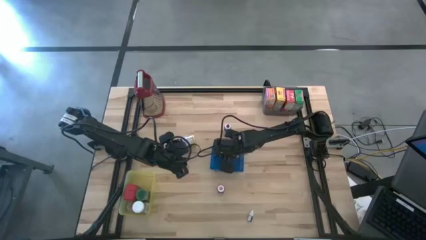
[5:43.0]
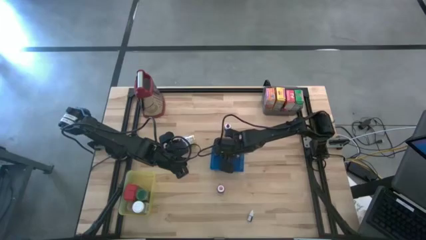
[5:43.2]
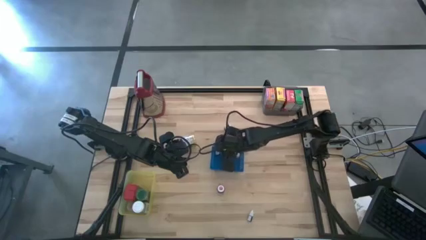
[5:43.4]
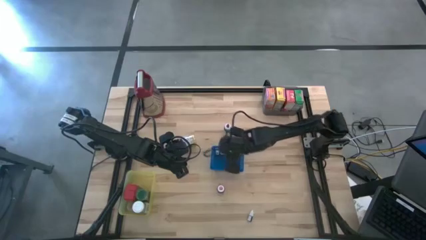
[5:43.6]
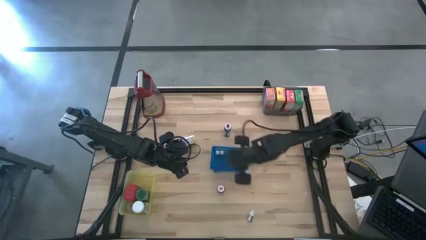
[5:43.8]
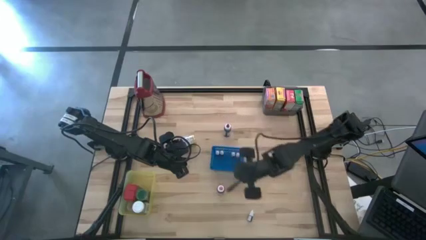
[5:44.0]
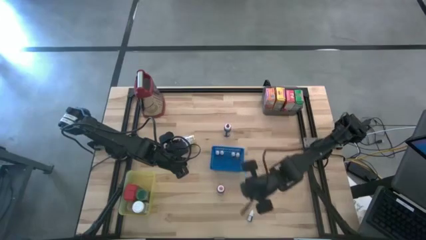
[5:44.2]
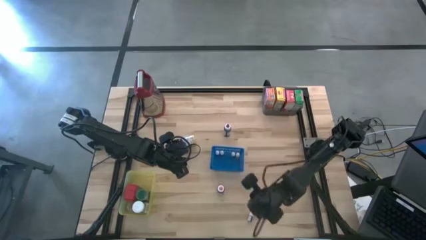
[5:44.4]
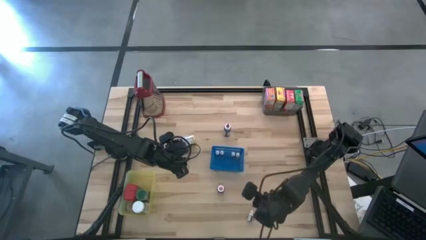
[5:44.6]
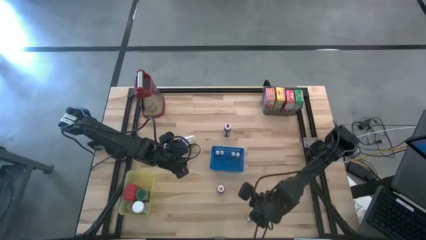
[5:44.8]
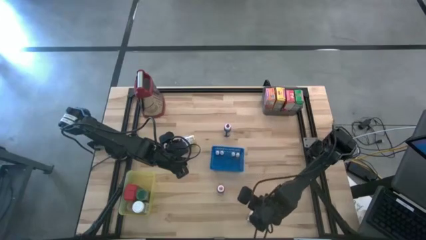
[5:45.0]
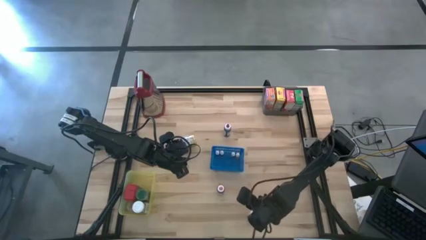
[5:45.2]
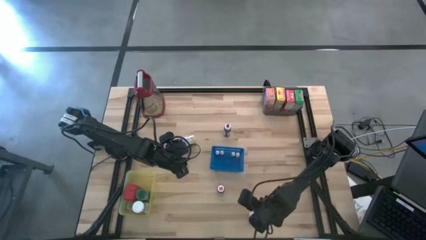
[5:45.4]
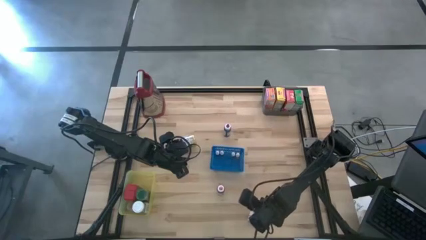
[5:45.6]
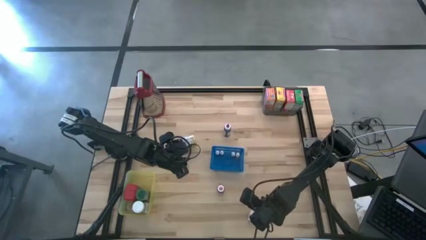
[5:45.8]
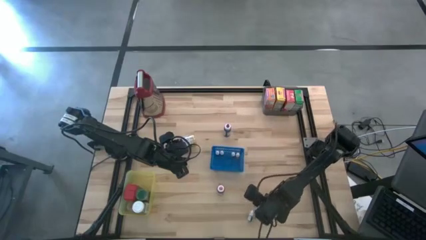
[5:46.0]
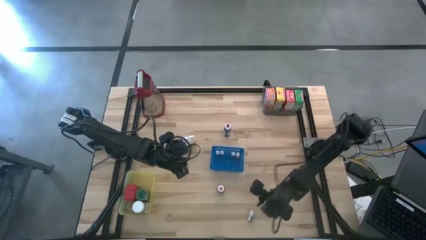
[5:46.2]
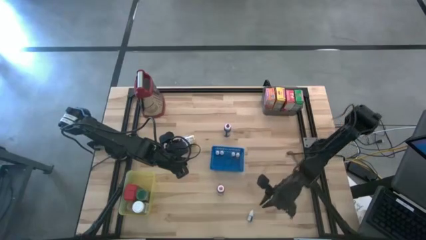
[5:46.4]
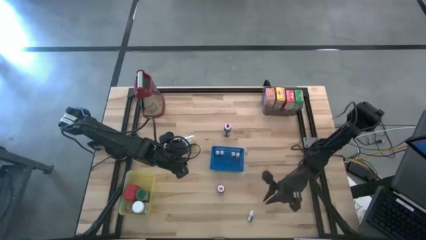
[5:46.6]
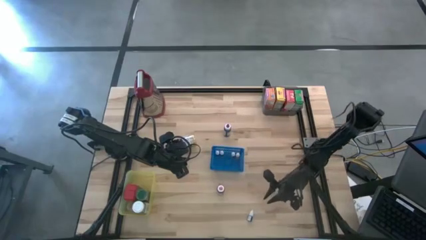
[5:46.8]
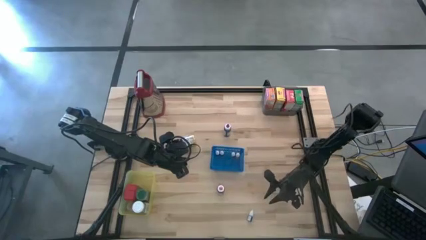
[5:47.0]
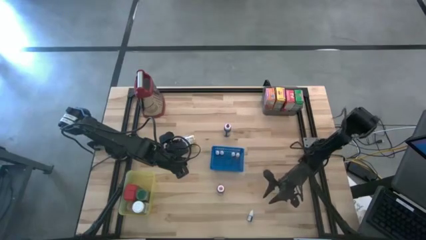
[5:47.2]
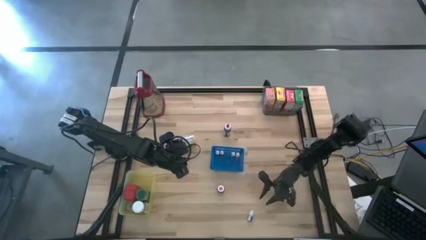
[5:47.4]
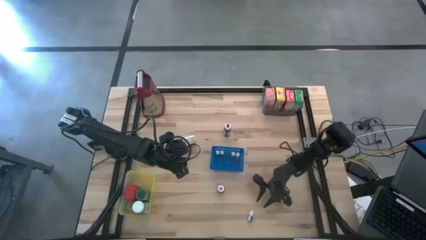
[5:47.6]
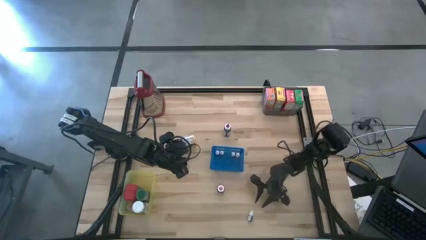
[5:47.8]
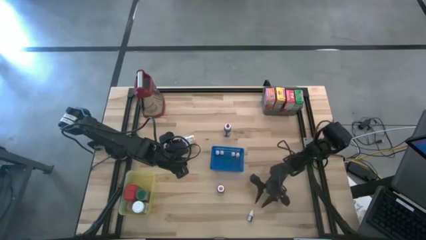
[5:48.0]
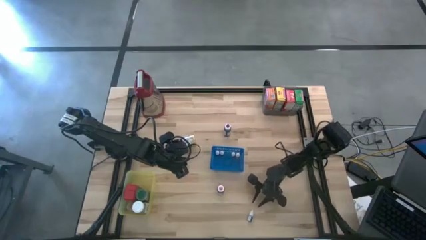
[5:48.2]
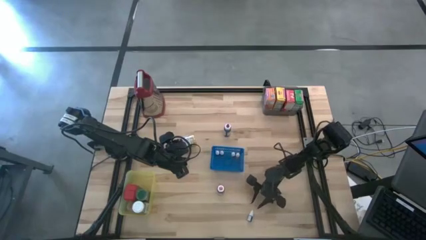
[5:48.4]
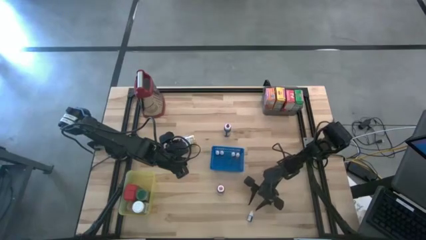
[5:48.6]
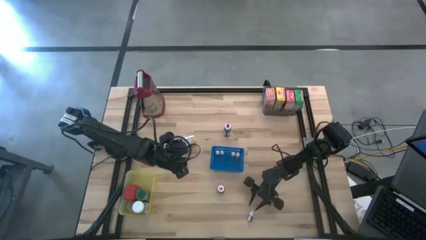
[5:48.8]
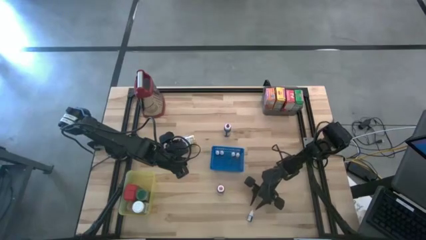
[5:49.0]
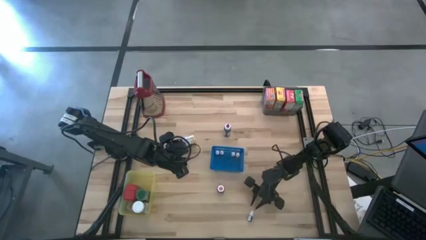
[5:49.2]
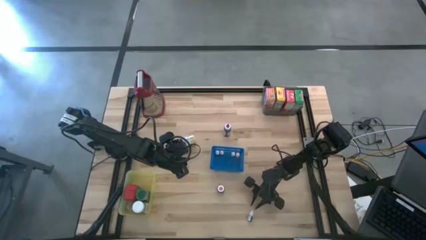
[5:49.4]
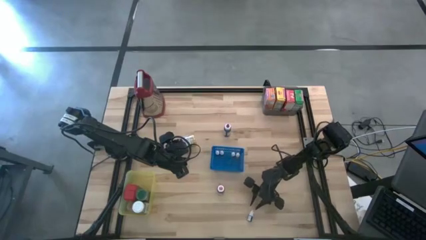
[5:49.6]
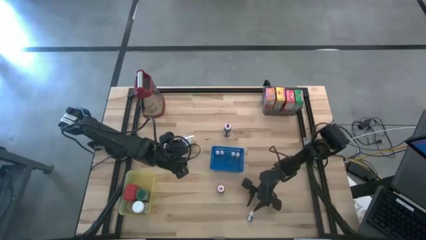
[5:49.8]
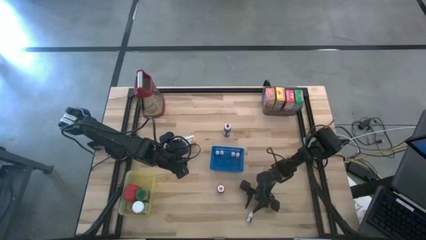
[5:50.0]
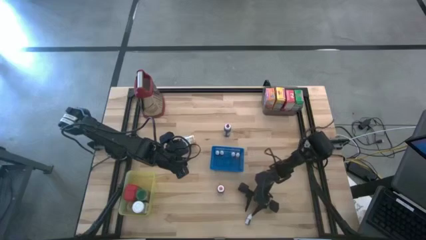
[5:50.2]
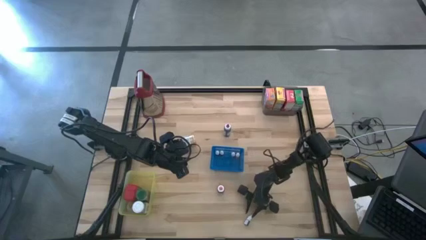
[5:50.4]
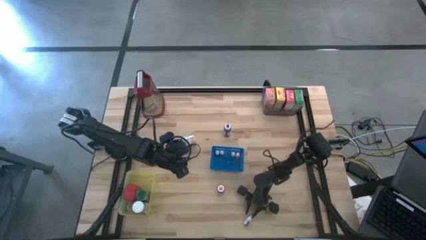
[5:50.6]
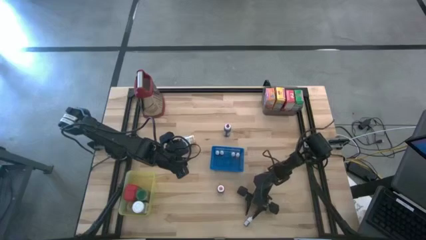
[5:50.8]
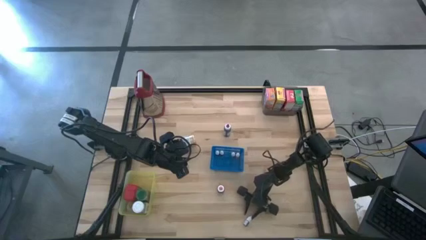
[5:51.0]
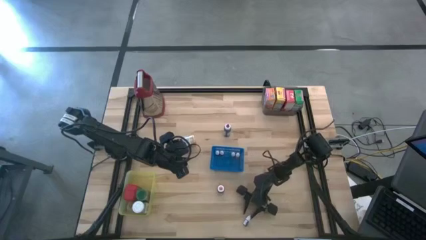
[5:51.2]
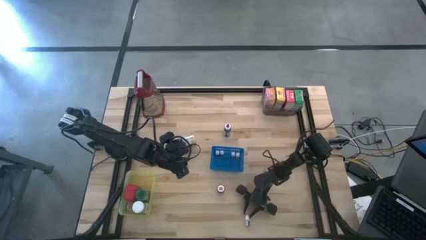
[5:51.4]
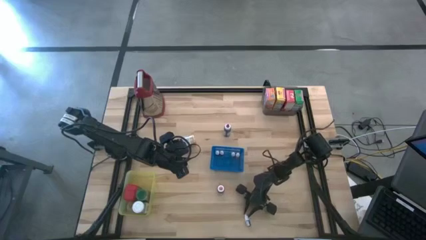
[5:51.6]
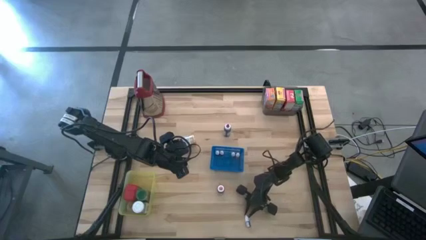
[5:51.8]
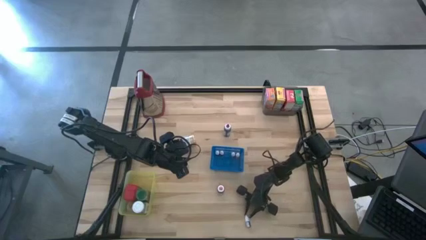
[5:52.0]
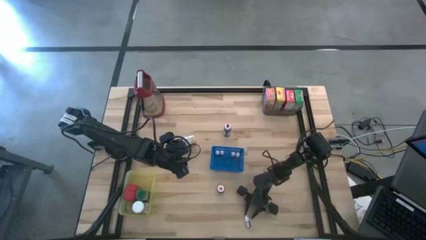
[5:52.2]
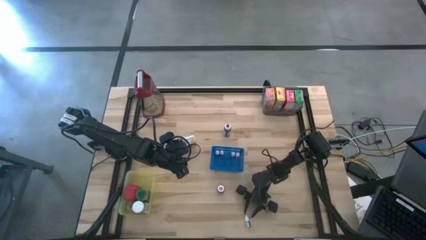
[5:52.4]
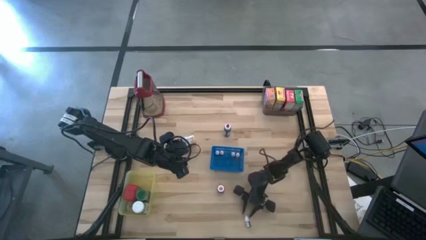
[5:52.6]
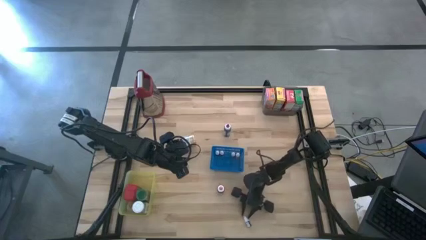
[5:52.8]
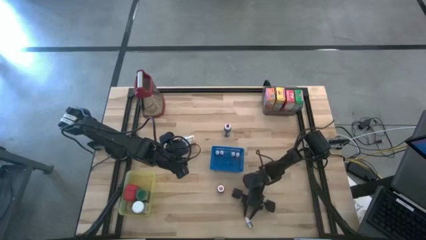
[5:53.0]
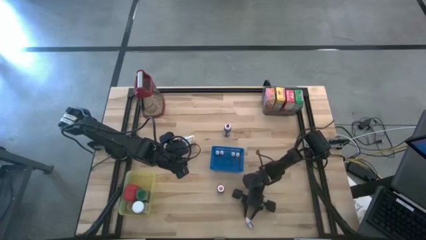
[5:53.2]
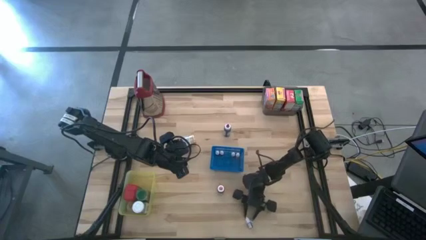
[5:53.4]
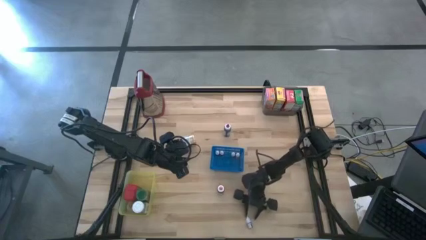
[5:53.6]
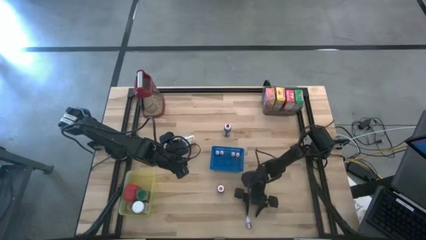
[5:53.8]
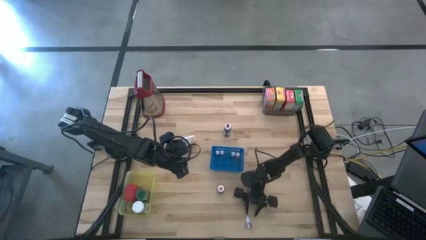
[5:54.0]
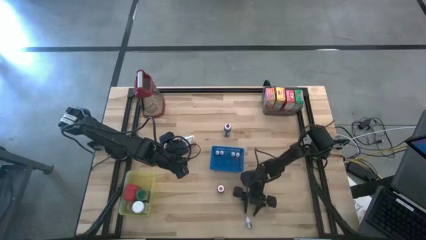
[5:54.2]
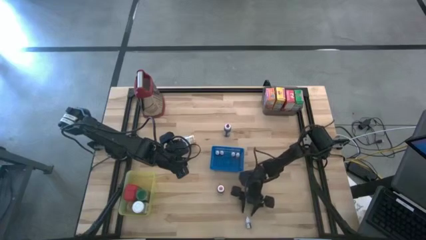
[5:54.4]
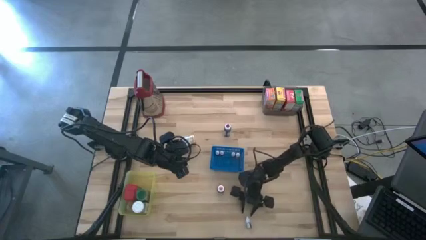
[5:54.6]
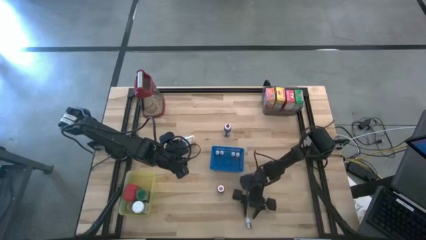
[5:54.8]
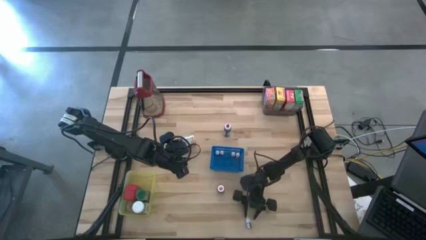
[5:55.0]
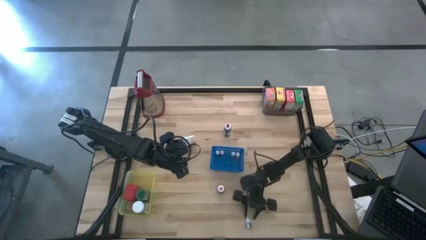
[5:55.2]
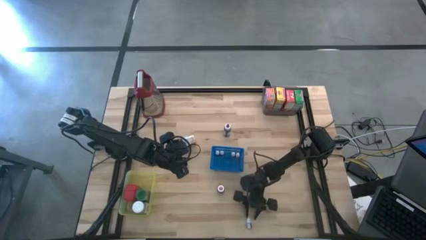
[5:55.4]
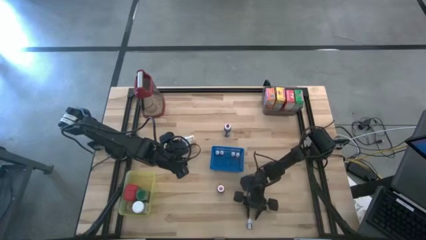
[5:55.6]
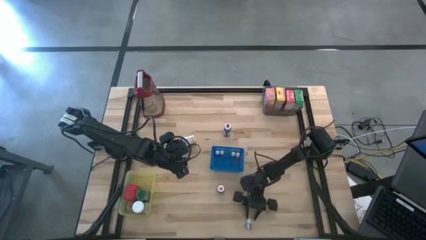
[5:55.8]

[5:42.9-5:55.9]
Task: Pick & Place Kitchen Items
Put the small purple food coloring bottle into the blue bin

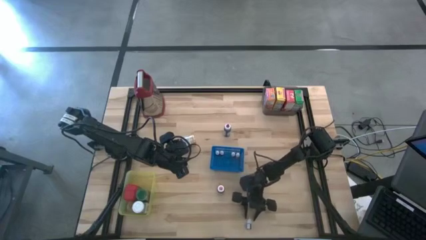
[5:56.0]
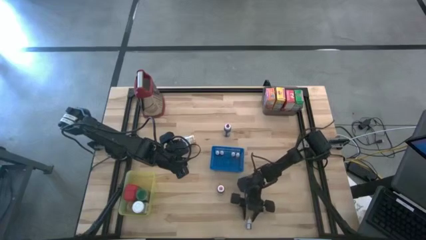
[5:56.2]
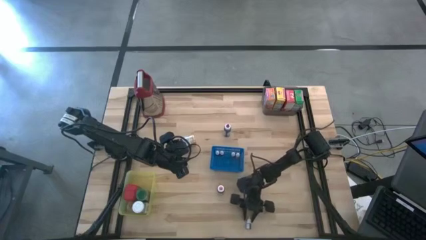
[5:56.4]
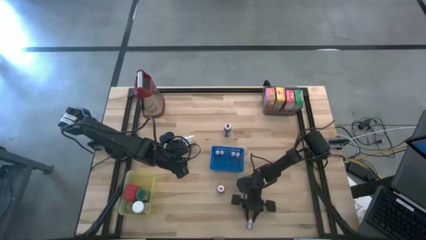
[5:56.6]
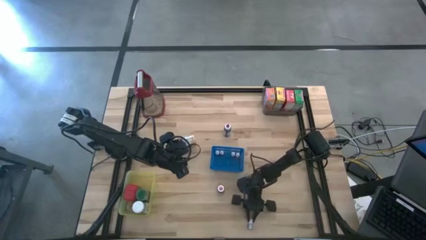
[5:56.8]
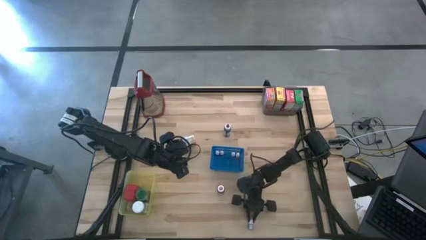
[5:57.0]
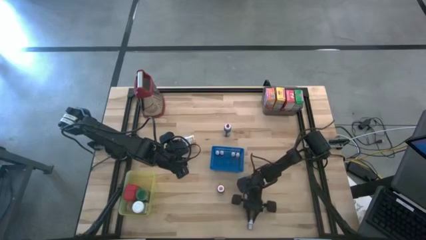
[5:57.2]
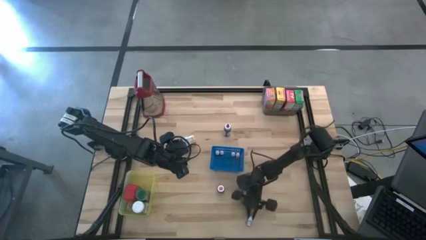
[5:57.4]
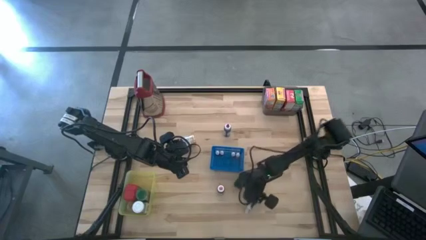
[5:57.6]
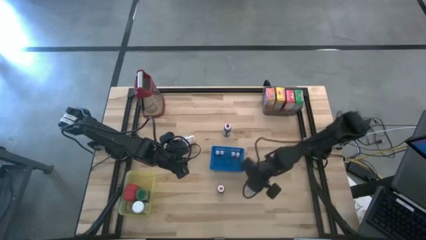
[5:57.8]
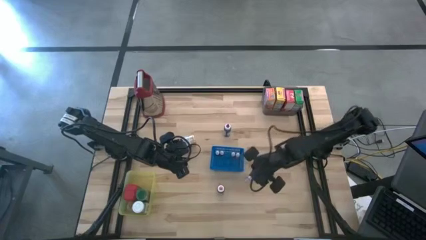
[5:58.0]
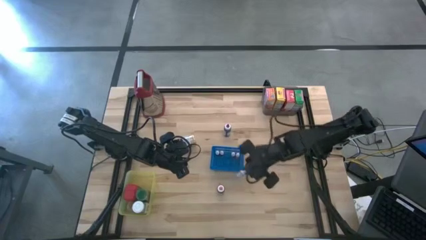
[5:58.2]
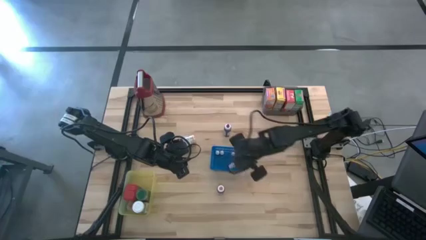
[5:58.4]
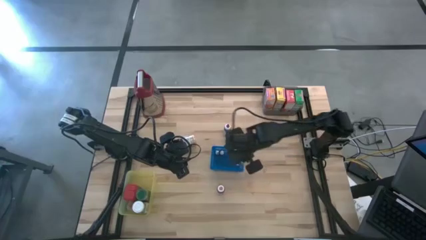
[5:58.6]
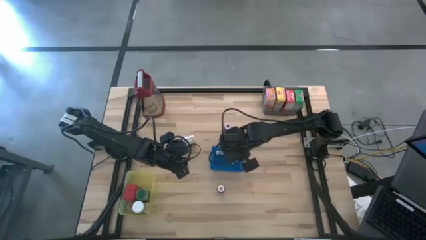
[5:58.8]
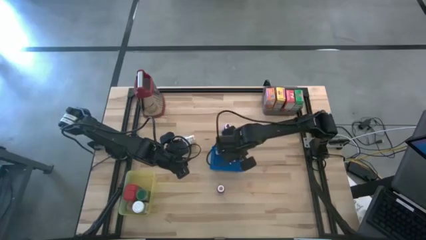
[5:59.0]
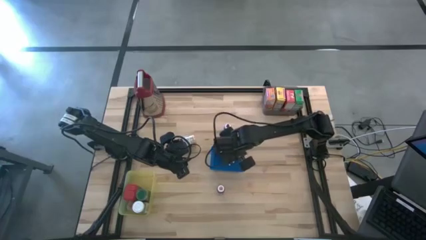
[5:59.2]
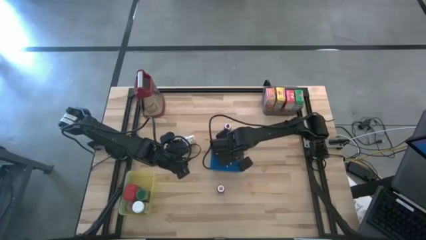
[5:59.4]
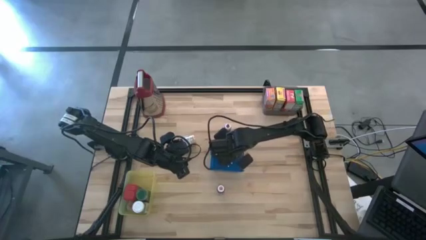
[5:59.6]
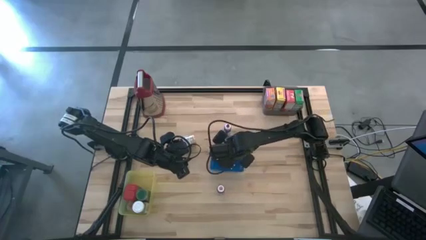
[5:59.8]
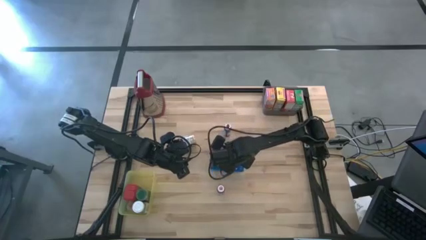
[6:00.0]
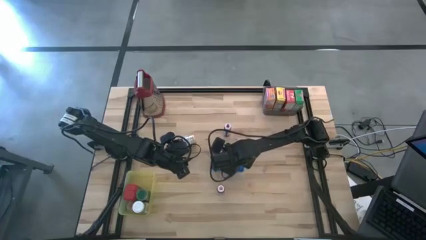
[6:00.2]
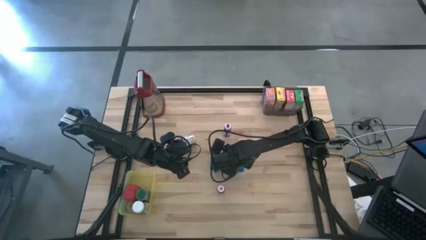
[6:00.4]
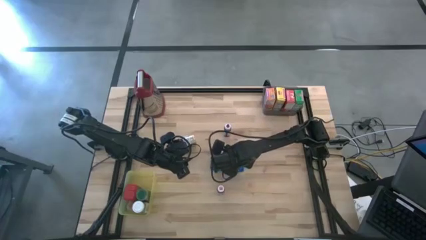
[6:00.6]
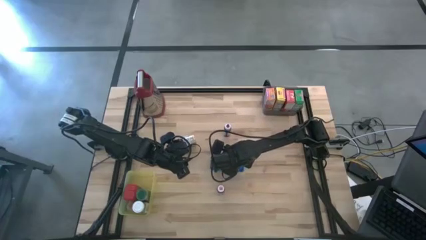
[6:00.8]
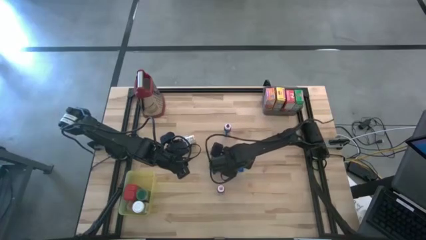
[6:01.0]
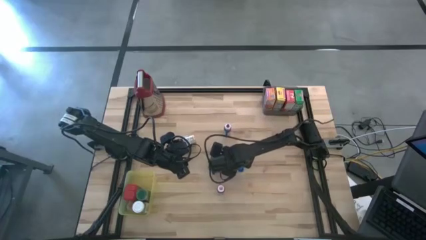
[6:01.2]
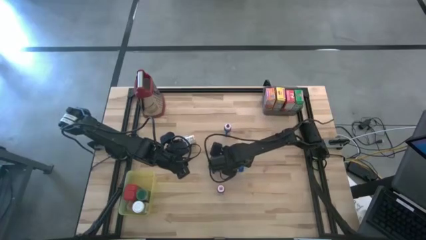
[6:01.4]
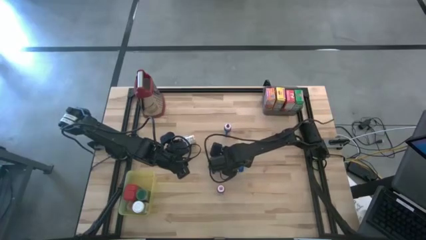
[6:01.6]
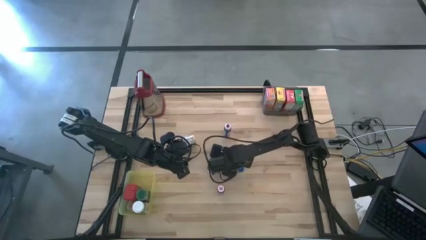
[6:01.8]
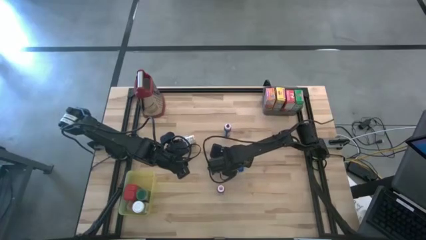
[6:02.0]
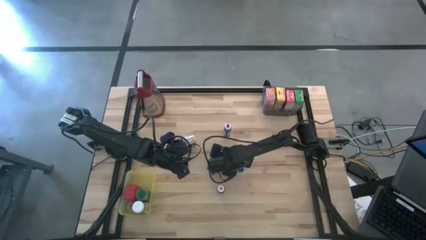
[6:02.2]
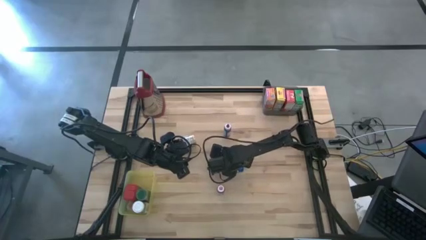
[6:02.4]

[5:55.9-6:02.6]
Put the small purple food coloring bottle into the blue bin
